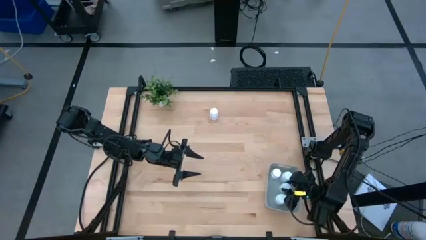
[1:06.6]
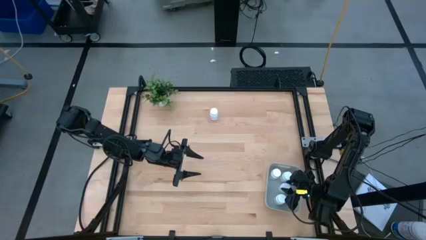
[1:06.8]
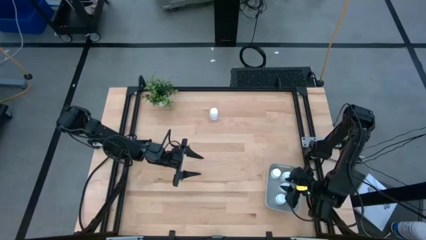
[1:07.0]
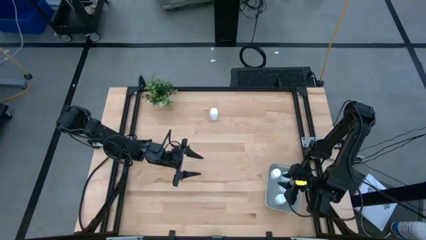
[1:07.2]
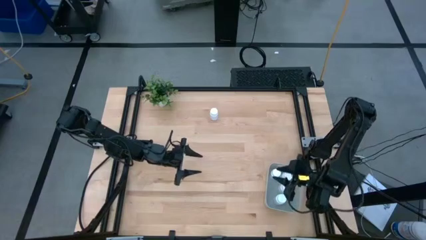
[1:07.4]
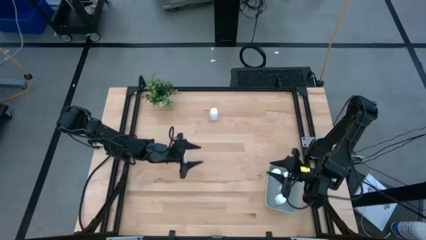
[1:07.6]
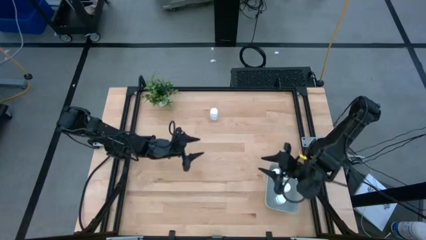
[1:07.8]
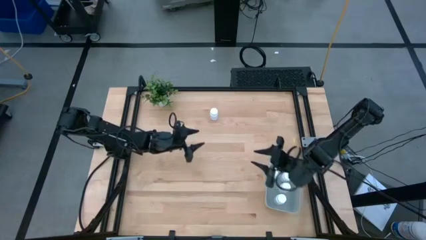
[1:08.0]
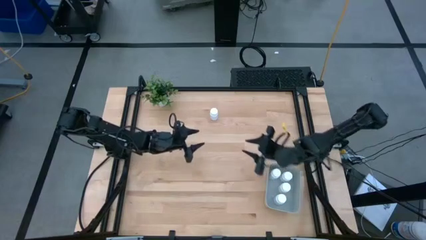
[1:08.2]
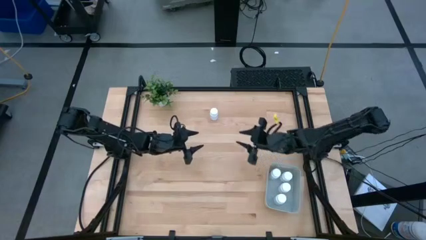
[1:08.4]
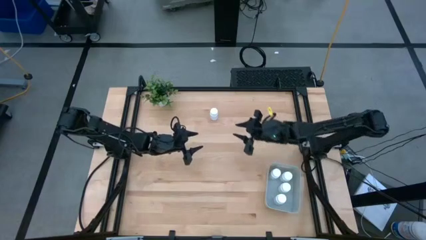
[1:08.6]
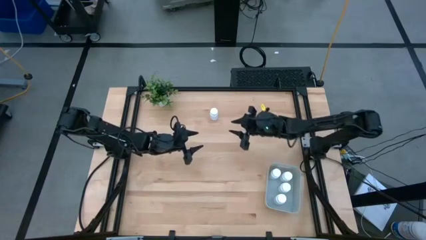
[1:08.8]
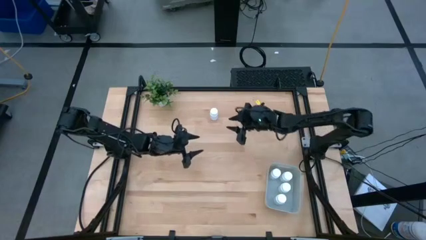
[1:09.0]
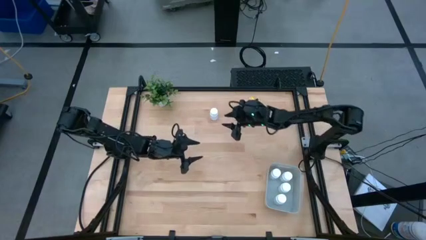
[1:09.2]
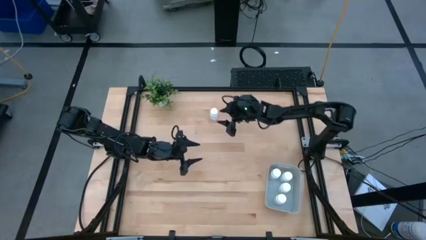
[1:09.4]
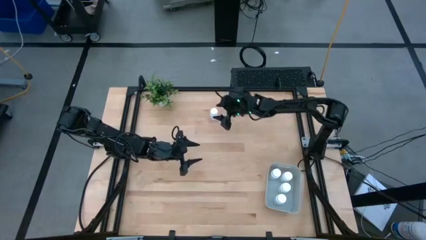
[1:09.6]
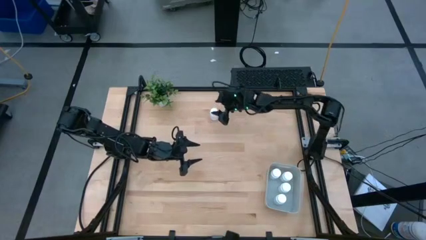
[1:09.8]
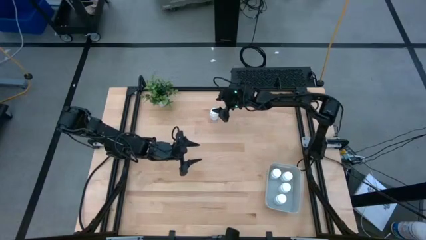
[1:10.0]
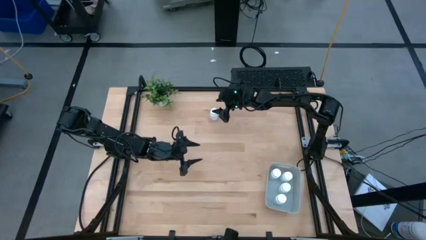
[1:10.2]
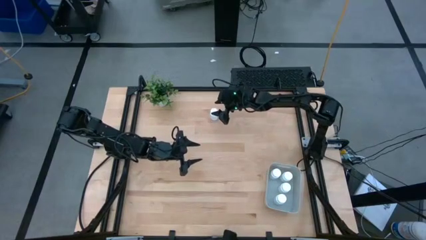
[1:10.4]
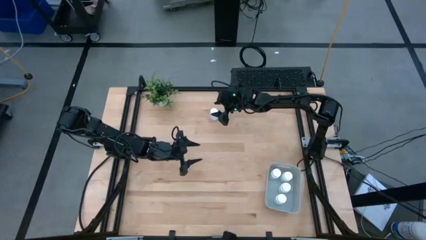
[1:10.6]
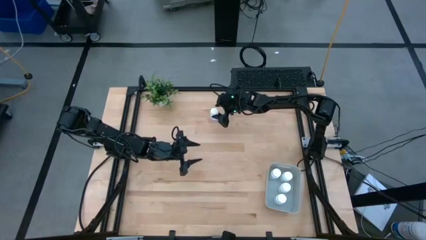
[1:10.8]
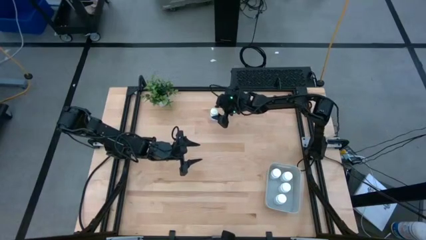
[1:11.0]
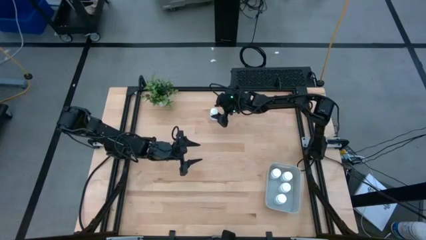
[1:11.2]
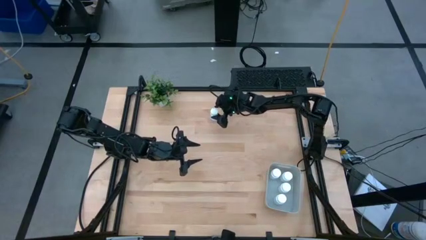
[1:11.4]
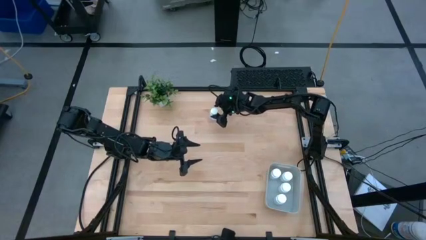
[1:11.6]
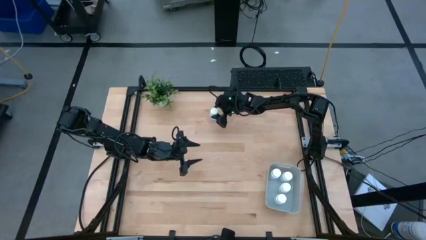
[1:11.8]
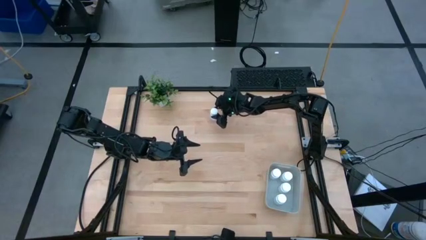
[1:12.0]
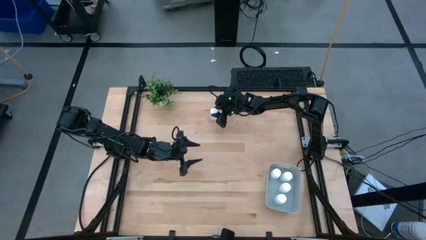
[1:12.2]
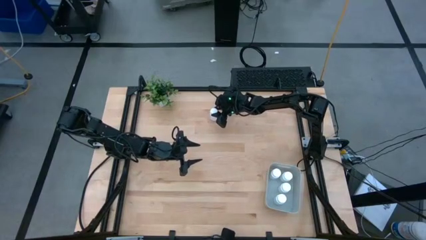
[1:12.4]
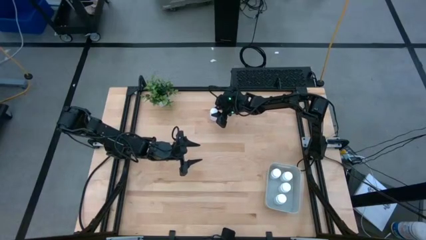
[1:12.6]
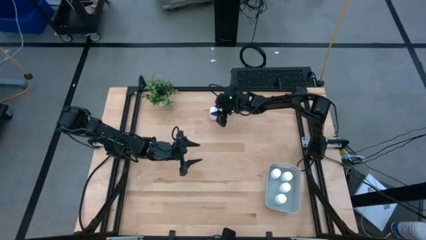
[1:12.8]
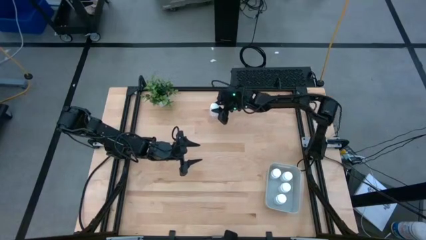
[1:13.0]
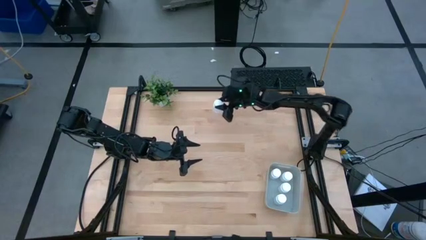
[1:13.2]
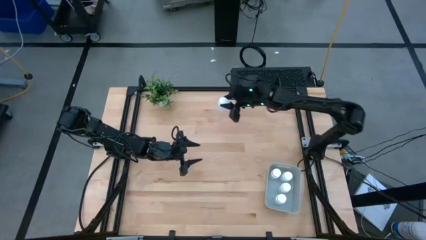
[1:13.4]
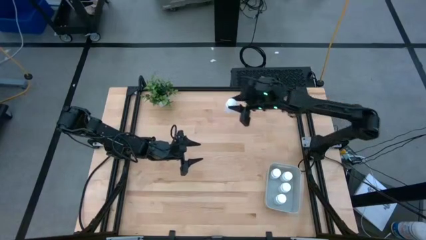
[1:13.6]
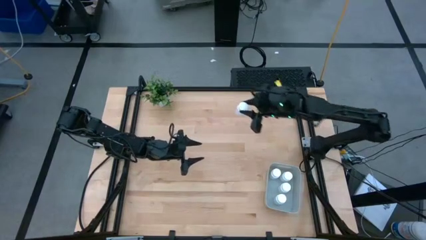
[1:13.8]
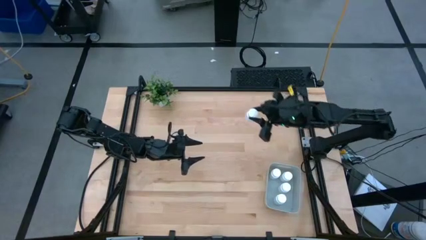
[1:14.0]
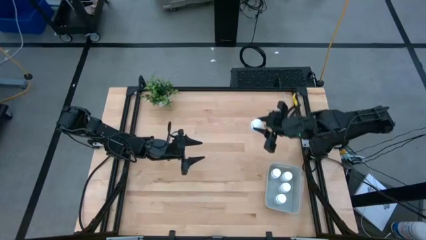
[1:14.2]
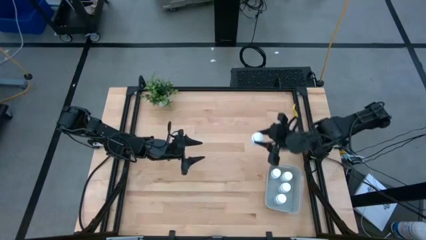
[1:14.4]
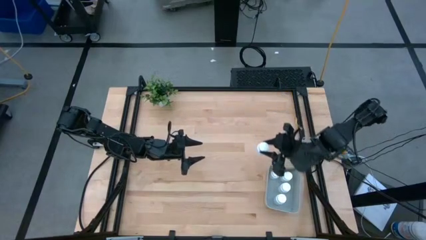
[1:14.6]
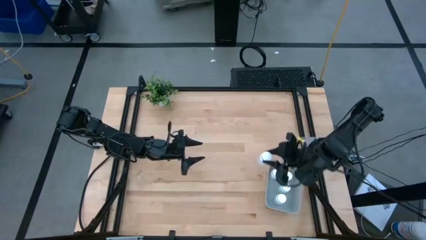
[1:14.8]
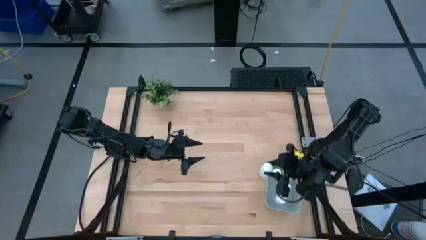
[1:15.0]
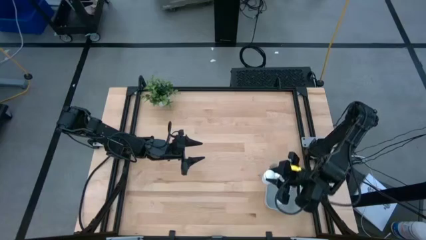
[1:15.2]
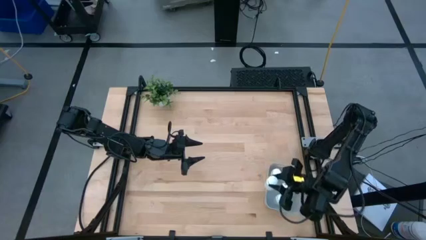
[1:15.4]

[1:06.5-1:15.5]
Task: Pick and place pill bottles into a basket
Put the white pill bottle into the gray bin

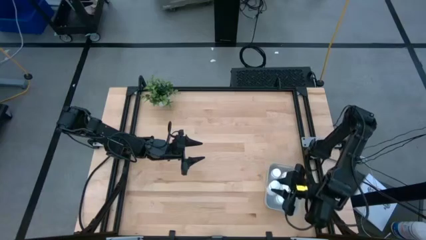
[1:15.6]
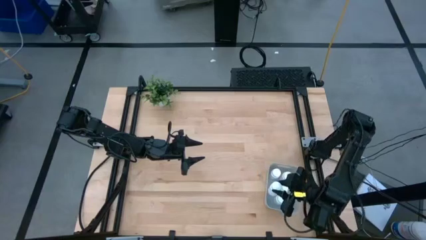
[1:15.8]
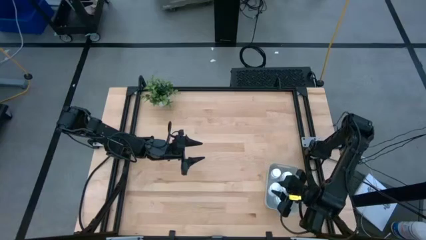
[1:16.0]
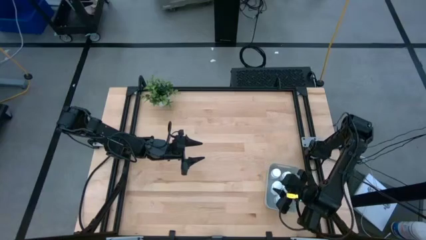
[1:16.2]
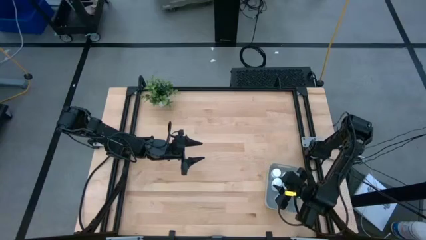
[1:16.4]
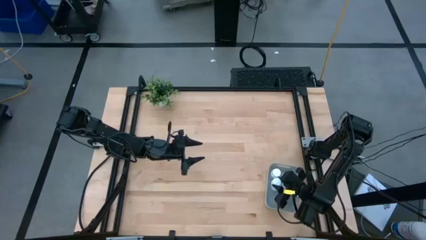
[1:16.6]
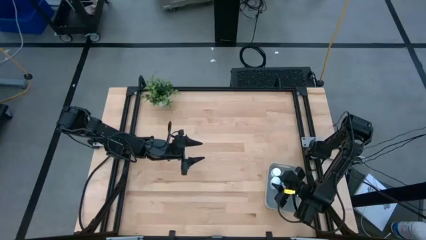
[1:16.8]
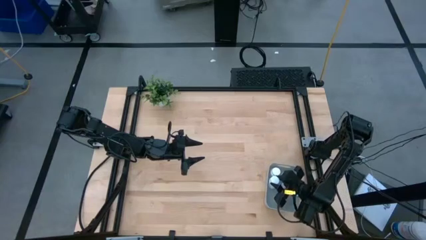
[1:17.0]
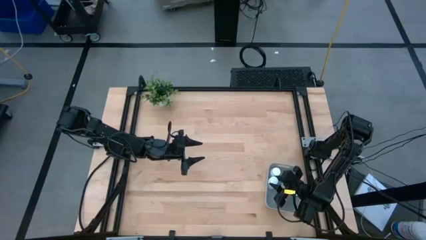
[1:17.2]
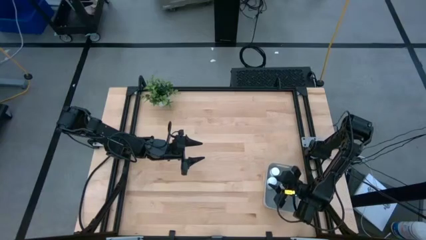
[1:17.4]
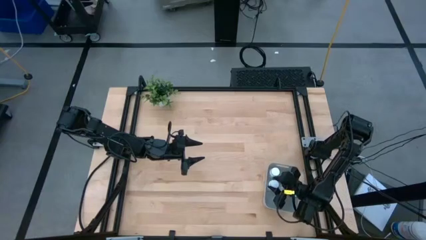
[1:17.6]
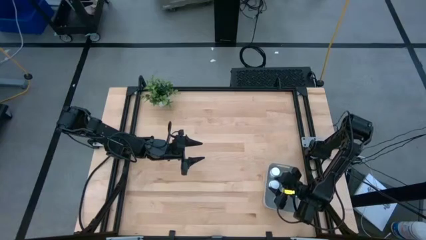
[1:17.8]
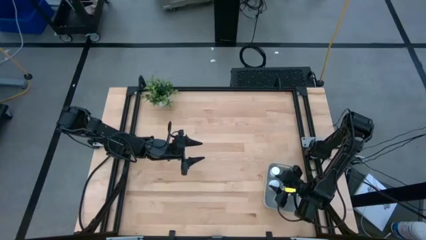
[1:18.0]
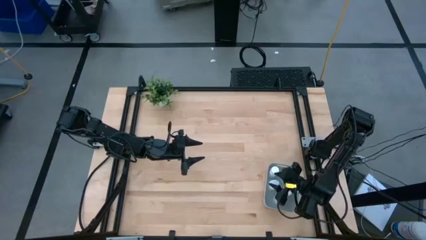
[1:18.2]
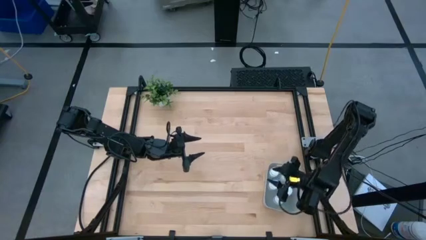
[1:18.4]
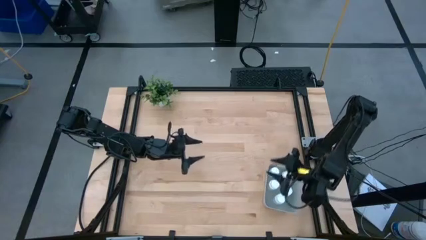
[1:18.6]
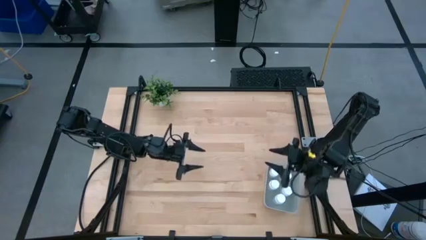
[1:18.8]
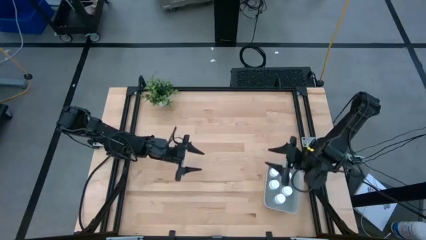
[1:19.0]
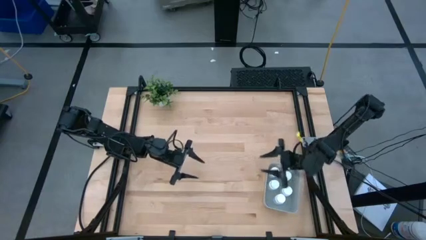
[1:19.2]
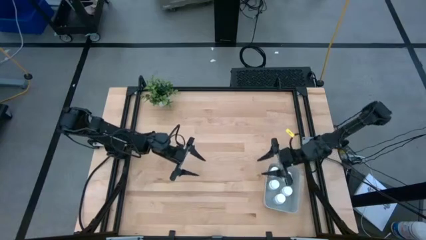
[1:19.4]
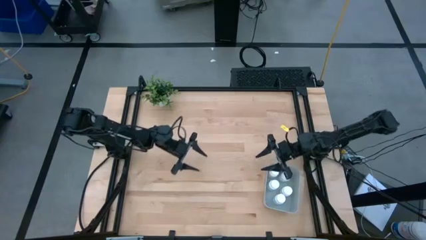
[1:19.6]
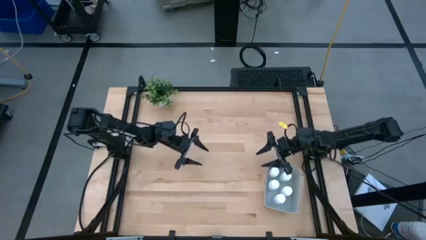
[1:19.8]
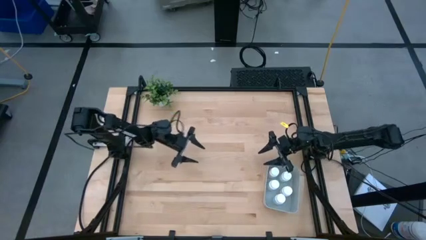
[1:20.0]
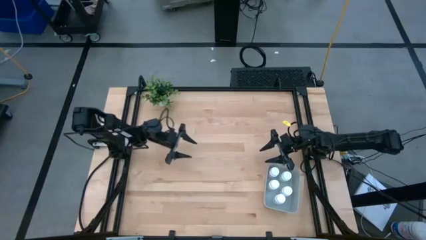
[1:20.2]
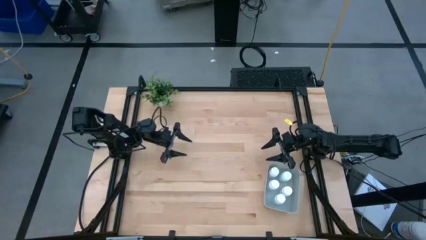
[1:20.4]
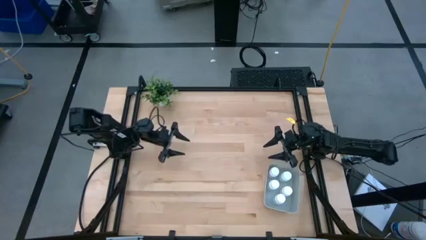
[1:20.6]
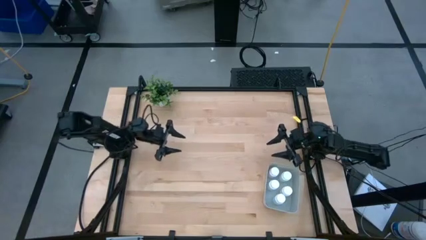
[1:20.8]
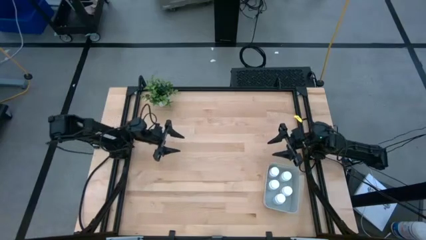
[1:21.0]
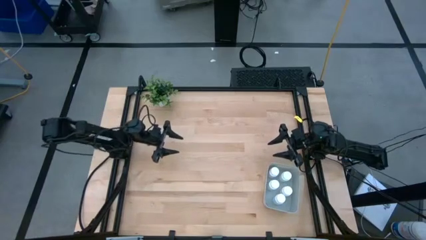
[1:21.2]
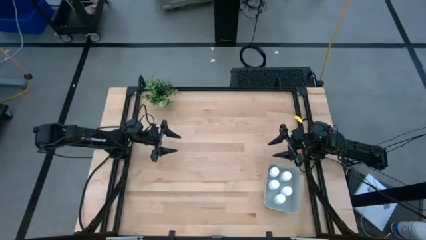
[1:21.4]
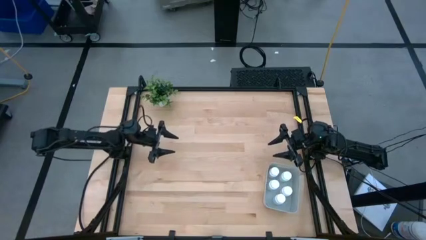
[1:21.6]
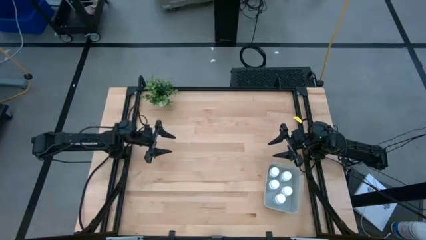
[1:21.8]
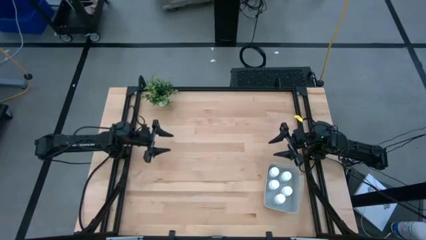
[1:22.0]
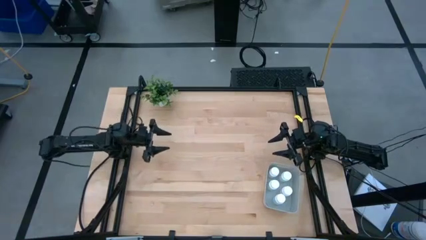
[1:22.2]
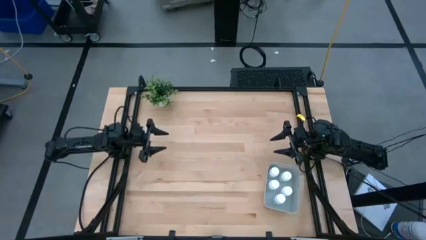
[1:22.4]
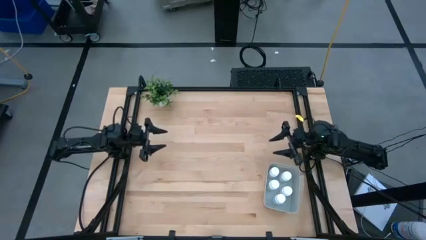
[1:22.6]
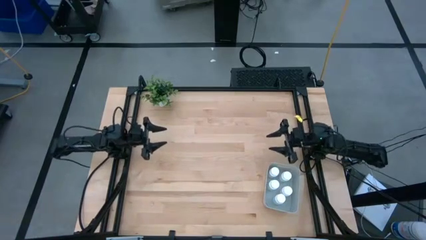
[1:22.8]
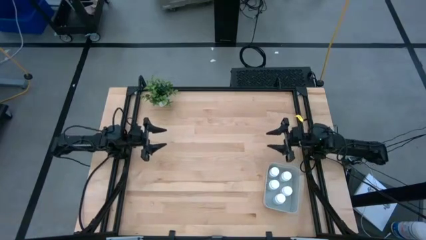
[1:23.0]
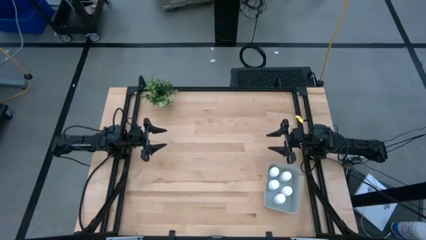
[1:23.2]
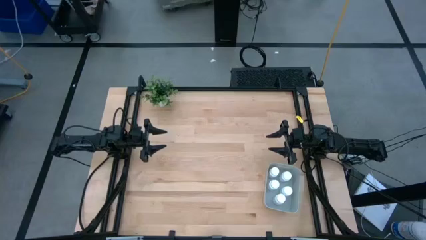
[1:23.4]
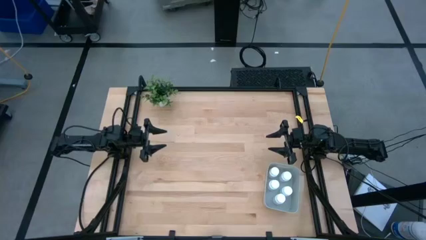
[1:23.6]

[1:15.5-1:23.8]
Return to Home Position
